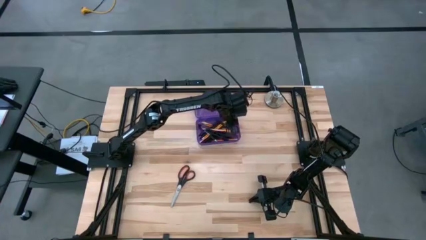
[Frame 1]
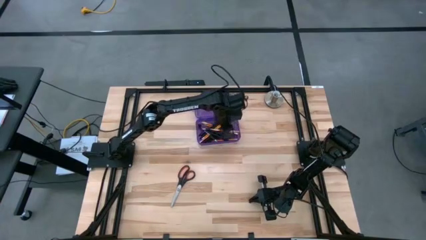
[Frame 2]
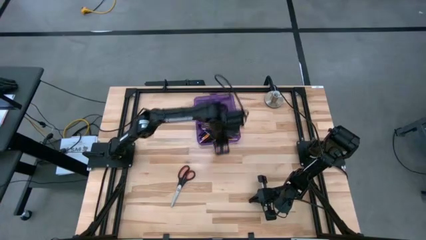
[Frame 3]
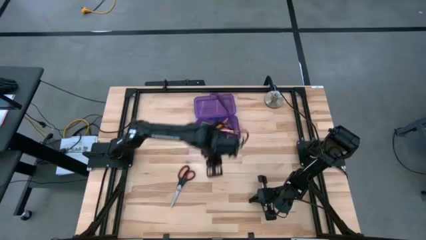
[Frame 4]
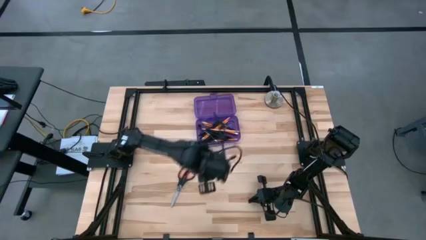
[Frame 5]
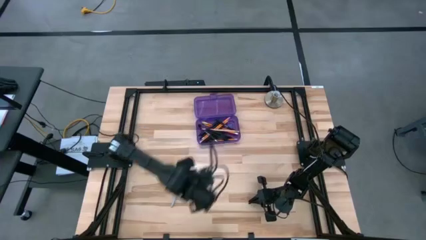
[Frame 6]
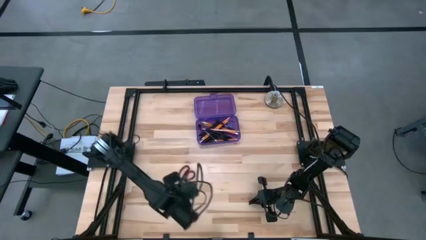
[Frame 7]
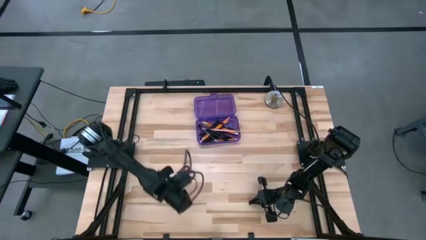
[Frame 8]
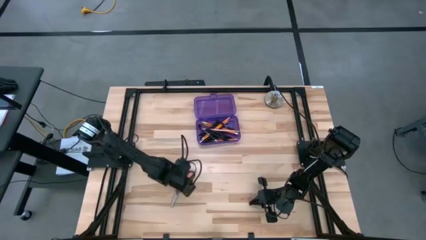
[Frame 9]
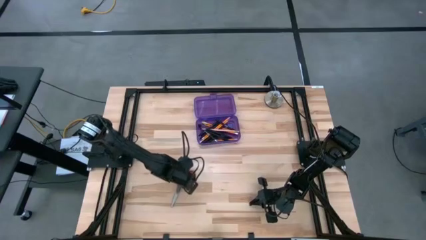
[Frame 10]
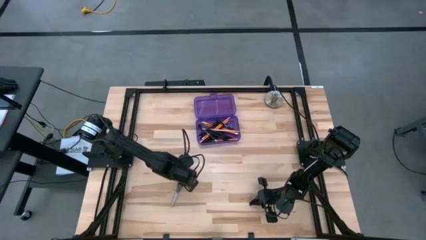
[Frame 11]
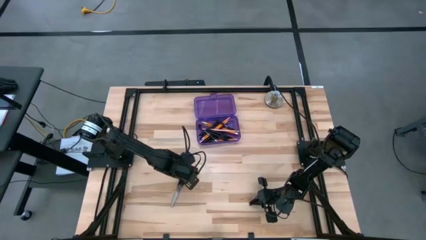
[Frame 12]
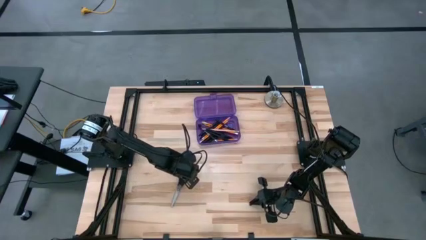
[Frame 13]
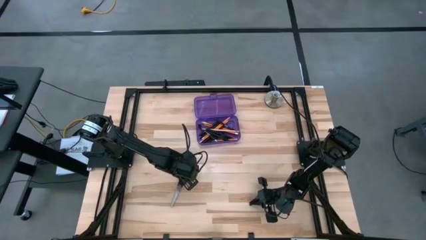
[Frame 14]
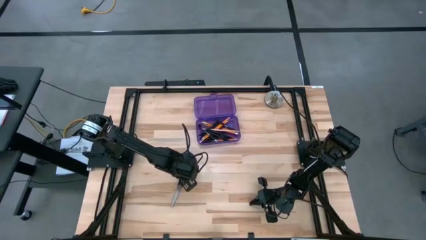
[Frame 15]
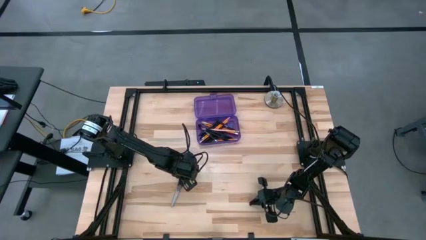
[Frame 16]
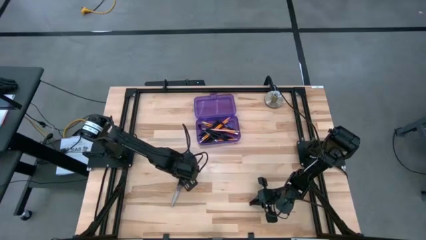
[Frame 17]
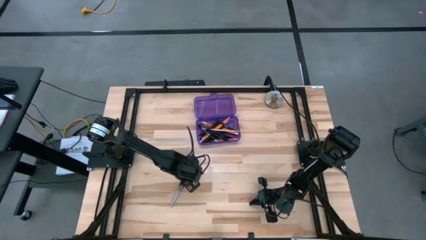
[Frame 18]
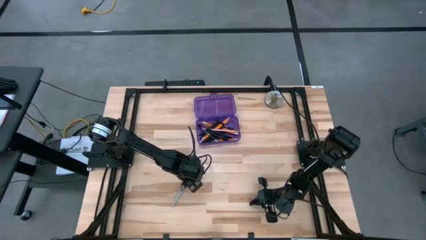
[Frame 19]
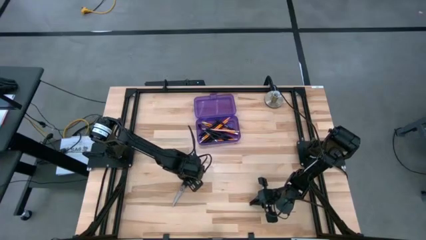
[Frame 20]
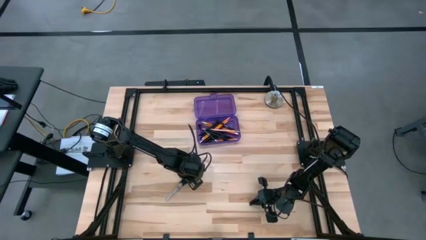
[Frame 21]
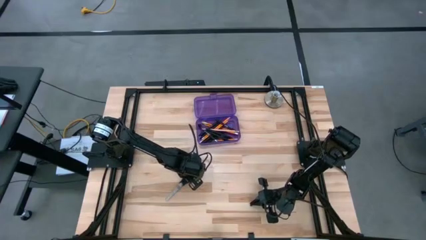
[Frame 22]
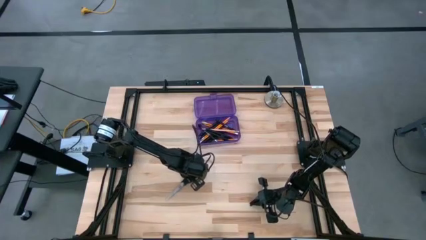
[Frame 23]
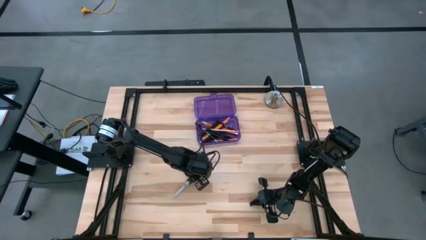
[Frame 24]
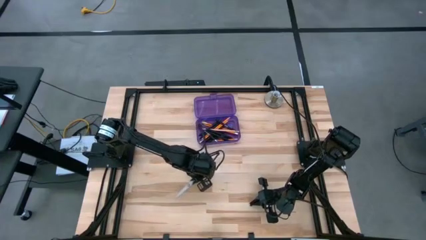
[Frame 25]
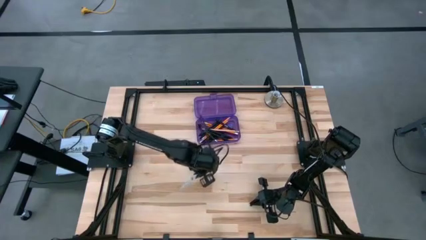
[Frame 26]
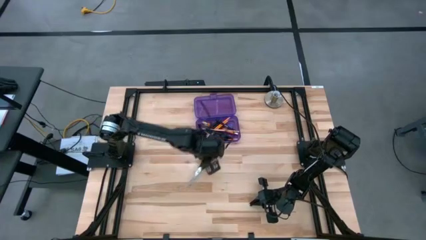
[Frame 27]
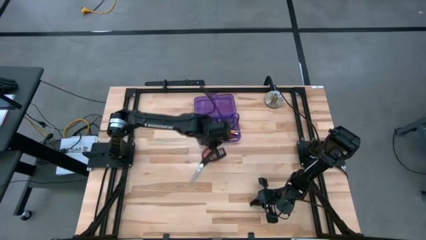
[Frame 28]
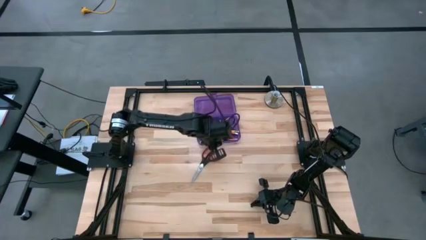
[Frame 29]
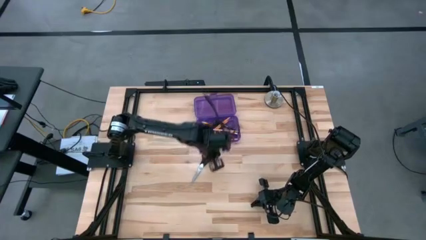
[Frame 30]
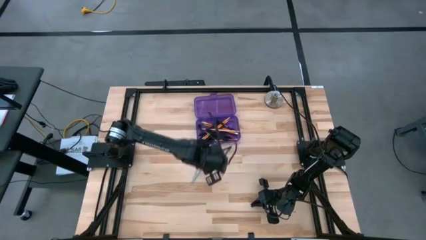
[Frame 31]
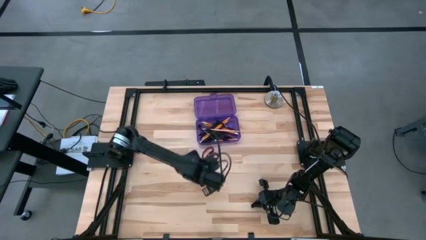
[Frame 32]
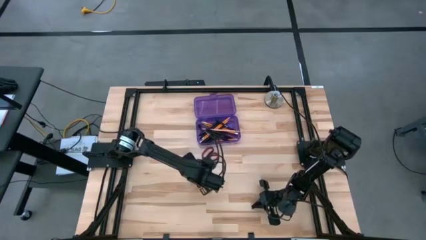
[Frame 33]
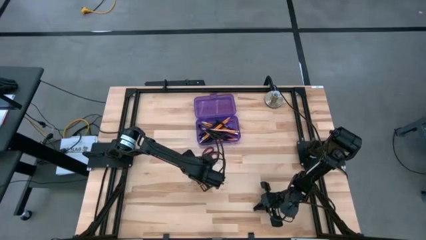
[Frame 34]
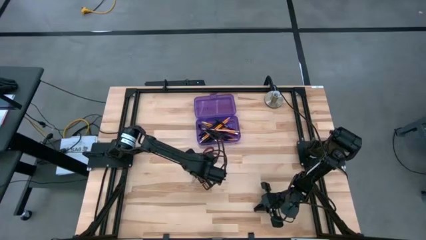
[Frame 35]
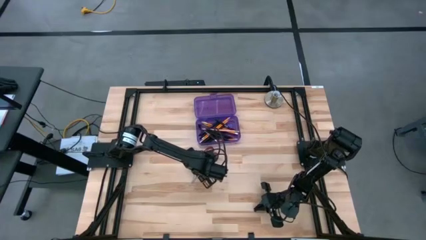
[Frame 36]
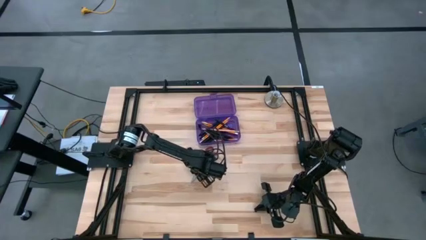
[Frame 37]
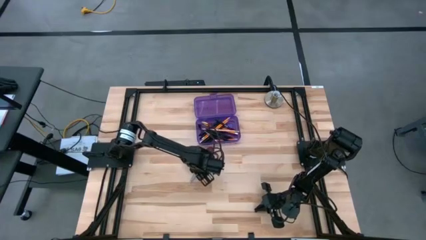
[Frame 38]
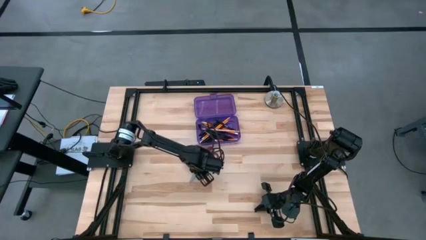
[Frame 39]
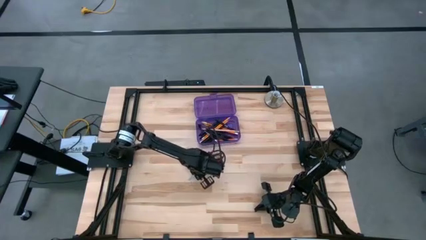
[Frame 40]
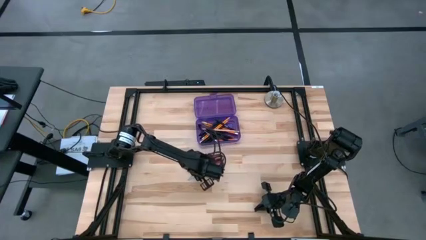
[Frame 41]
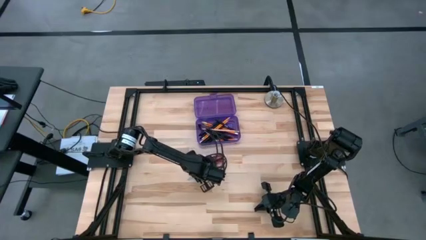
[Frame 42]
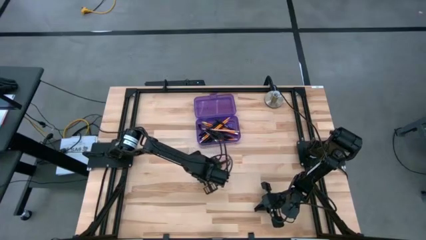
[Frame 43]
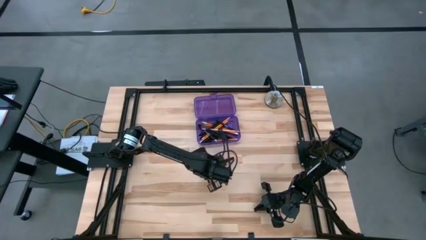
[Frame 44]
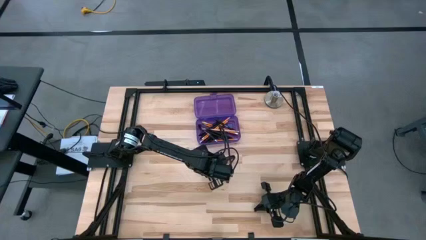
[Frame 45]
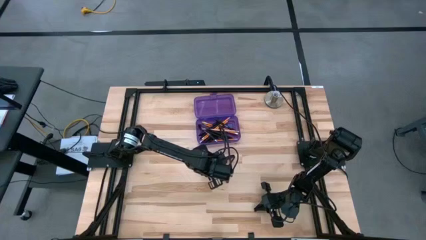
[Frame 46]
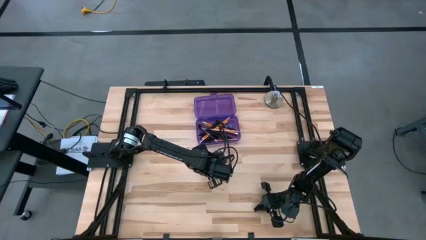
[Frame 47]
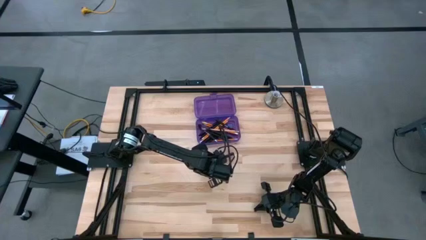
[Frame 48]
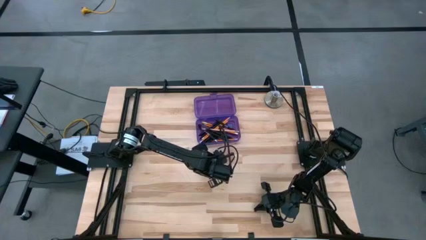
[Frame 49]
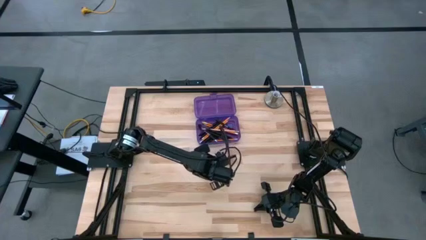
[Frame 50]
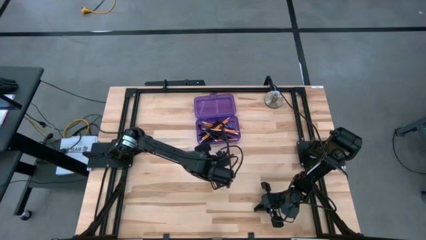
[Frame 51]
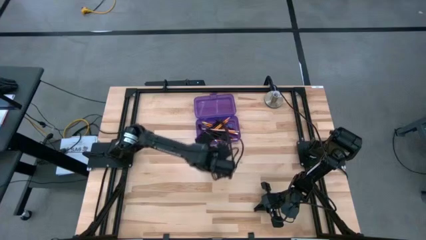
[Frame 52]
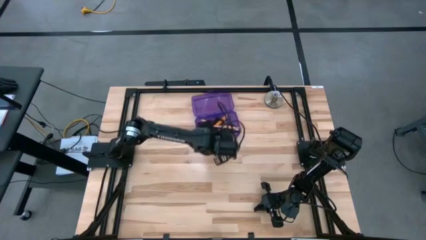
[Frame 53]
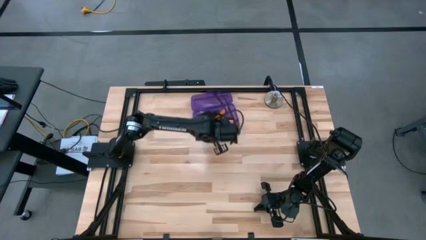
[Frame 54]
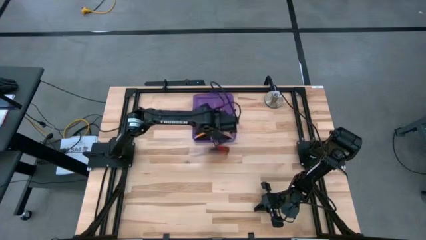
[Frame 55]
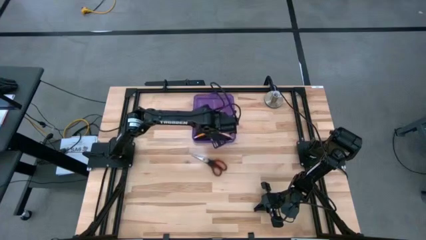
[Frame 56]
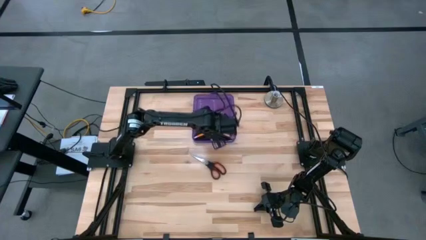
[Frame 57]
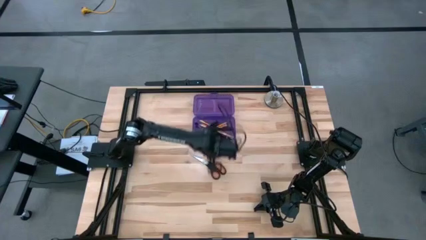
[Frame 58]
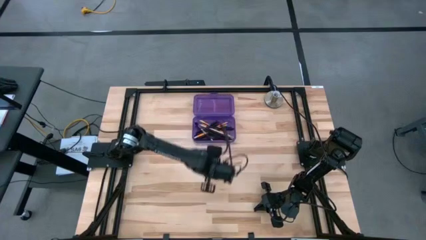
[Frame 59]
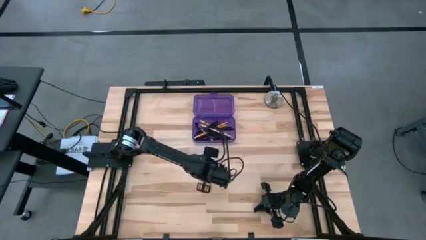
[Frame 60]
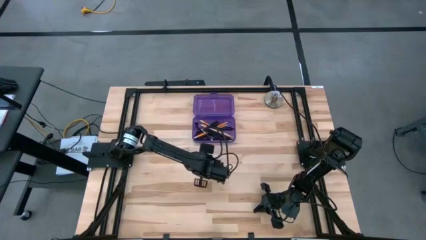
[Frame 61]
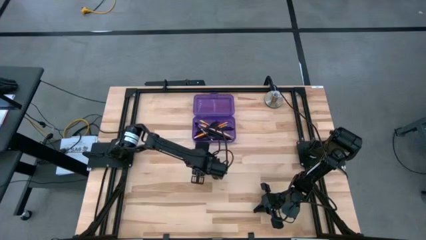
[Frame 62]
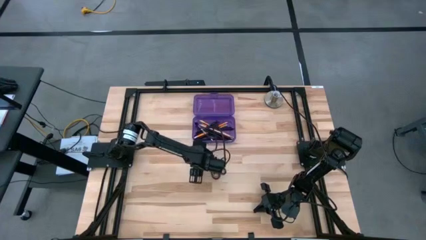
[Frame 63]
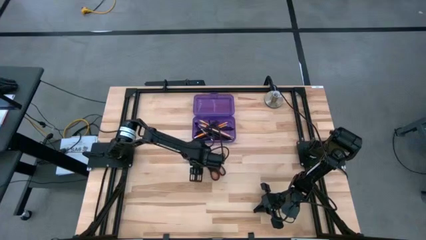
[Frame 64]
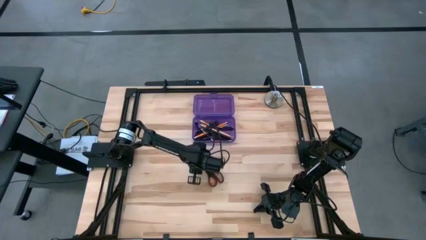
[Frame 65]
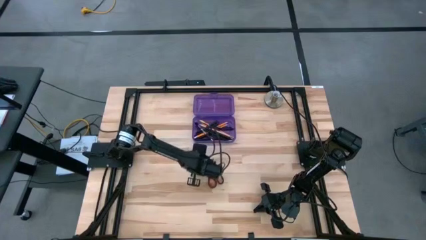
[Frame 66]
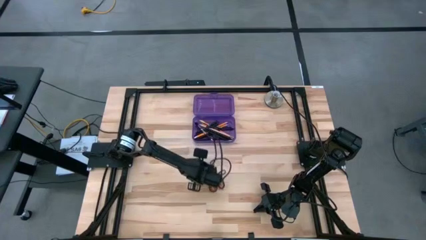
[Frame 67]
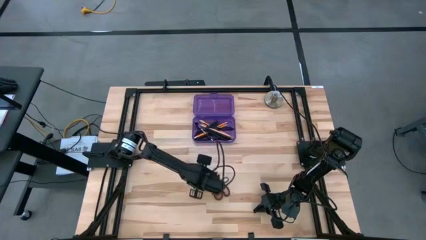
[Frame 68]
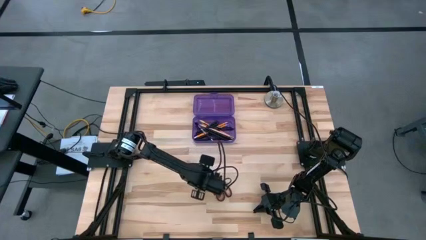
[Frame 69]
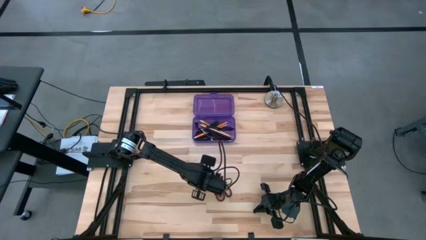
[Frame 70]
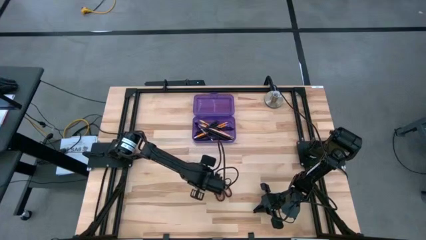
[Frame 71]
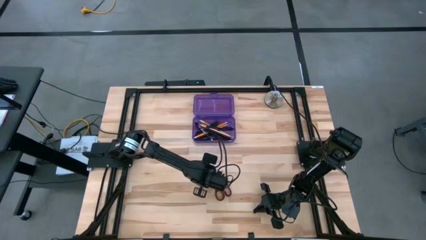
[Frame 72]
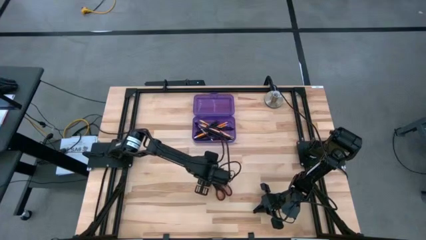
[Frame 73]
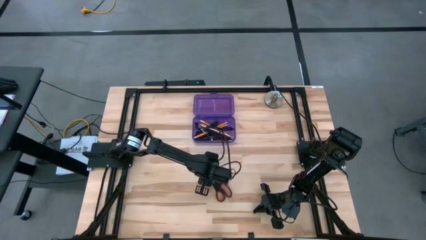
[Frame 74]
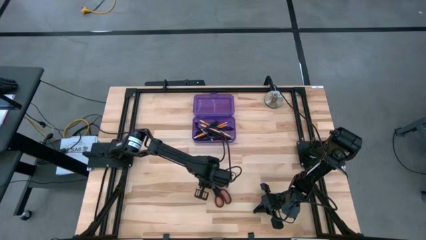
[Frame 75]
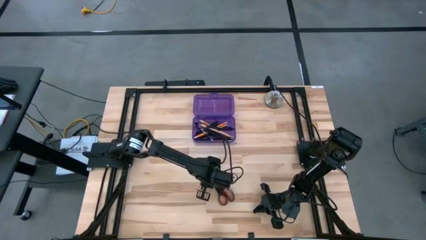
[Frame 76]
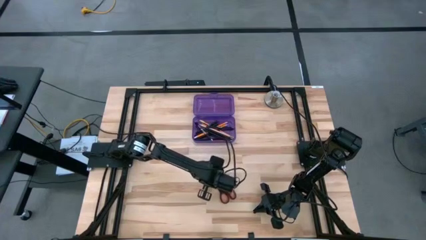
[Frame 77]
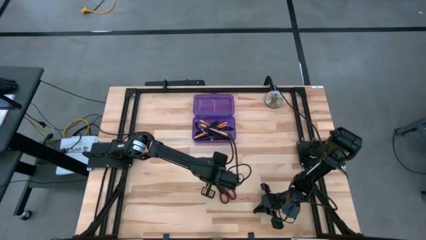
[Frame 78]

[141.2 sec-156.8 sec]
Task: Pick & place school supplies into a supply box
Put the red black scissors into the purple supply box

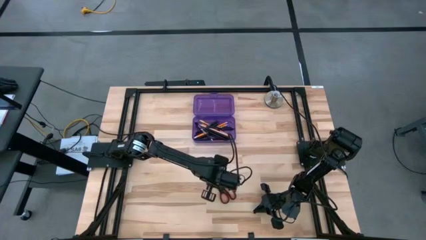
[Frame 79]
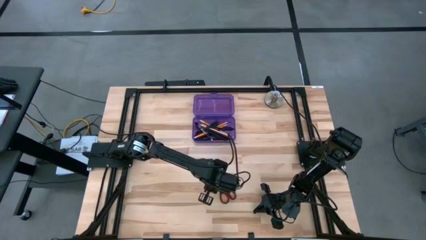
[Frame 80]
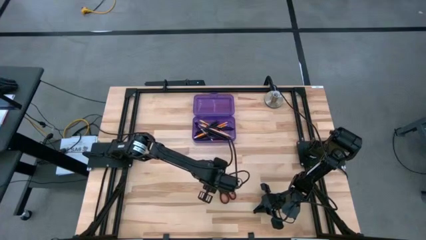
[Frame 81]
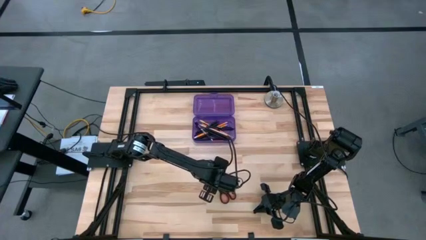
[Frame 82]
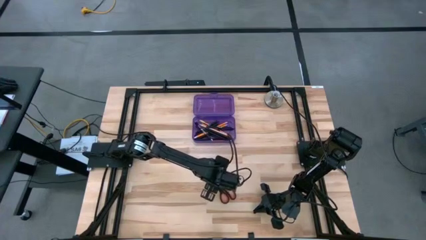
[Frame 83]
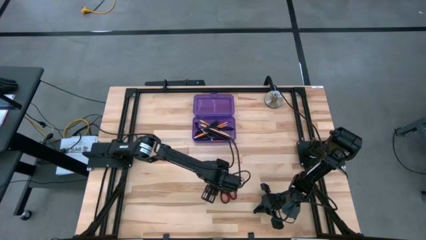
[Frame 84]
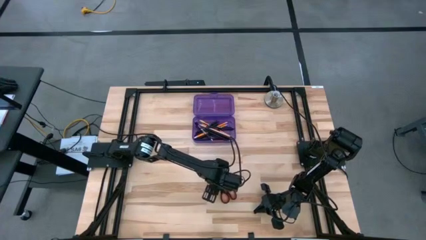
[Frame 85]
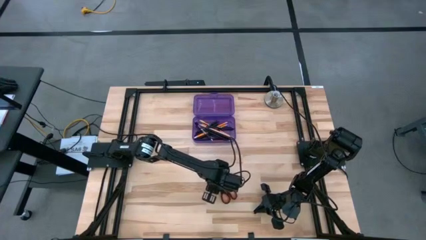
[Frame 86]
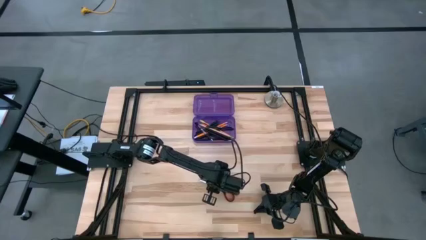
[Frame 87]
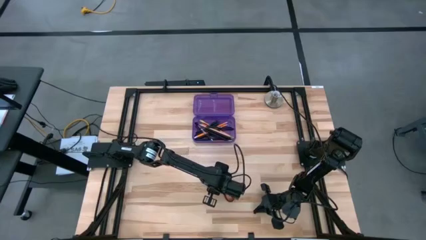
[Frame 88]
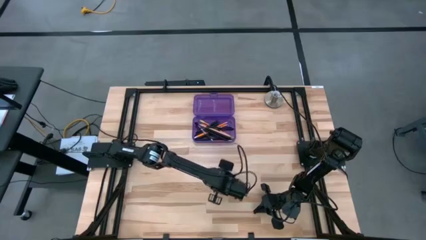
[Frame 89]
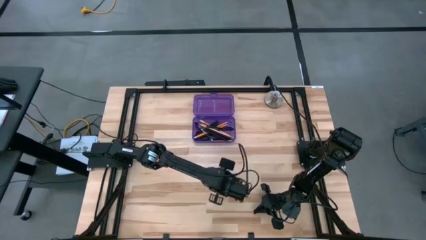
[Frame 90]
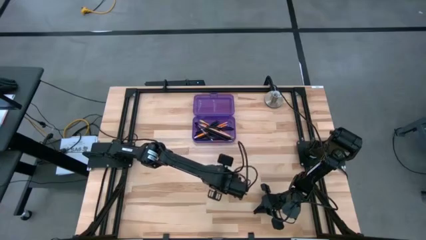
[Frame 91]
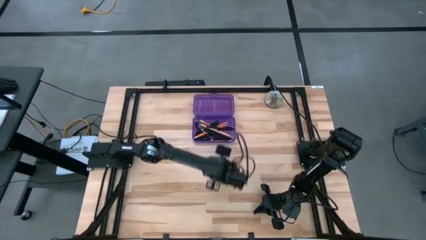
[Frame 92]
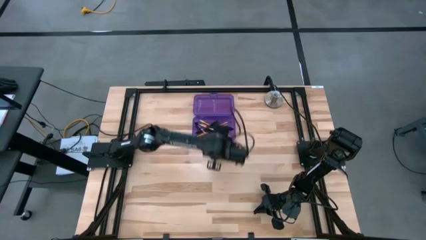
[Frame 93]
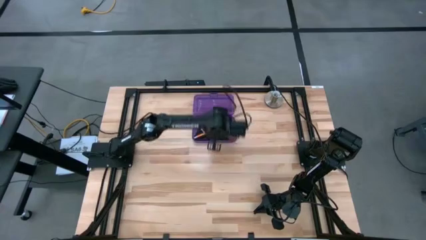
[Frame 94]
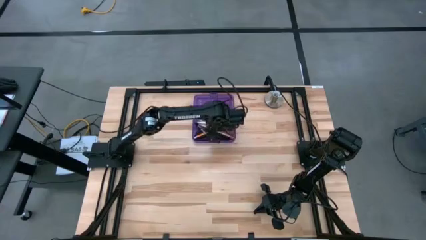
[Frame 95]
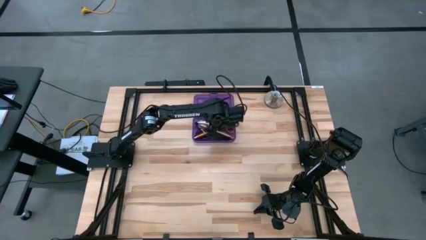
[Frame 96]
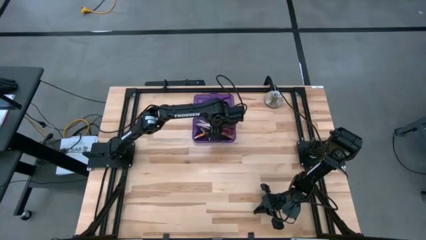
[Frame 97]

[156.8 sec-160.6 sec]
Put the red black scissors into the purple supply box
